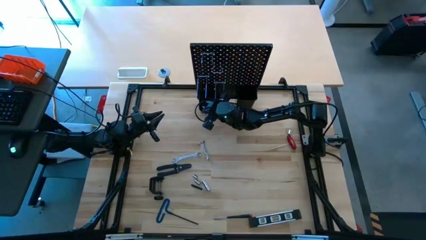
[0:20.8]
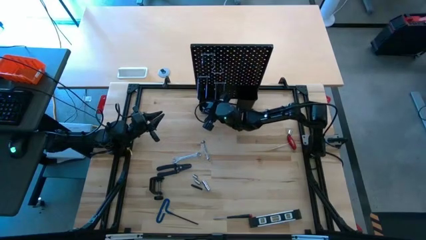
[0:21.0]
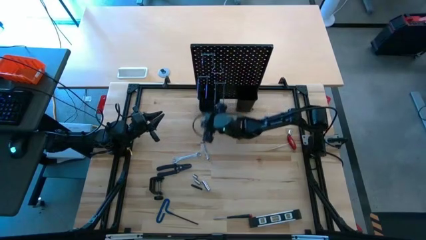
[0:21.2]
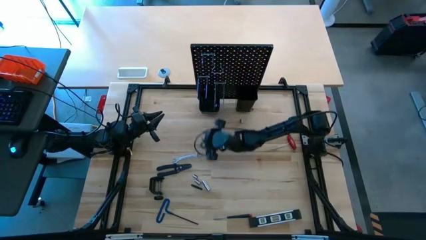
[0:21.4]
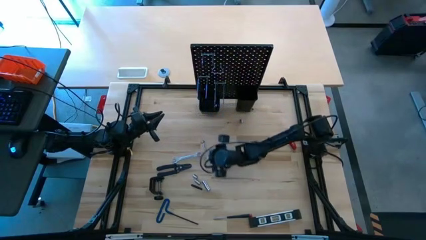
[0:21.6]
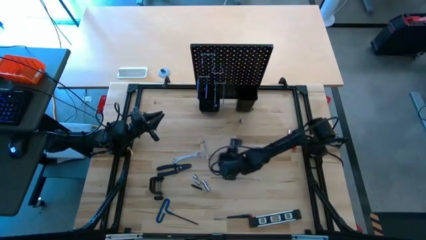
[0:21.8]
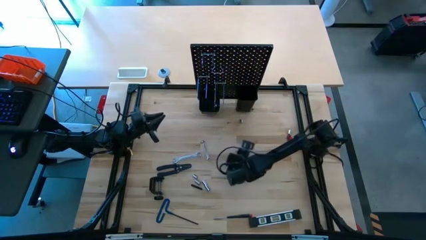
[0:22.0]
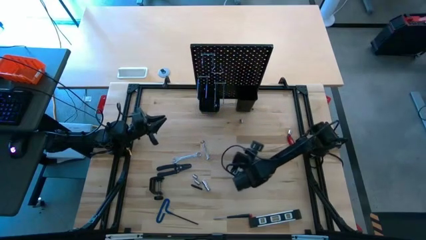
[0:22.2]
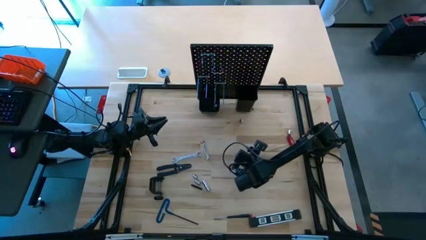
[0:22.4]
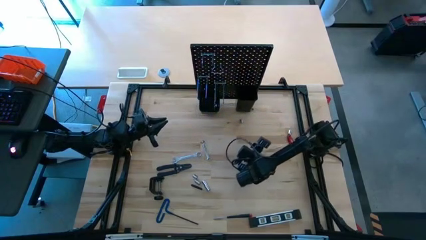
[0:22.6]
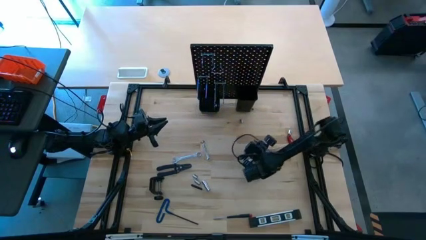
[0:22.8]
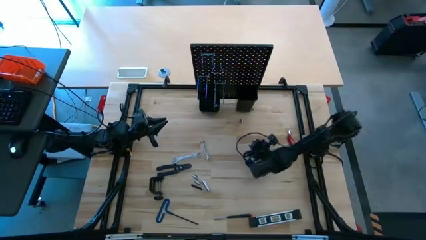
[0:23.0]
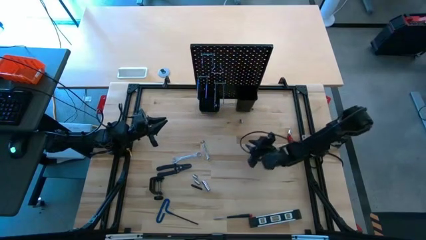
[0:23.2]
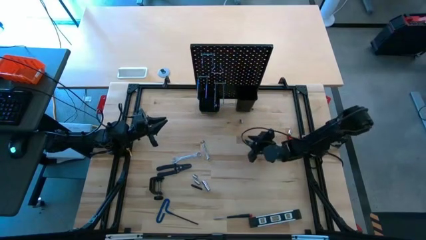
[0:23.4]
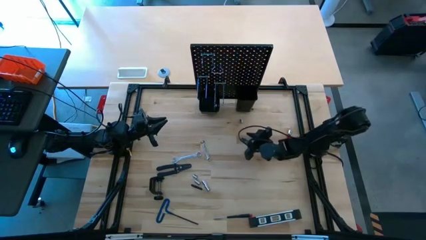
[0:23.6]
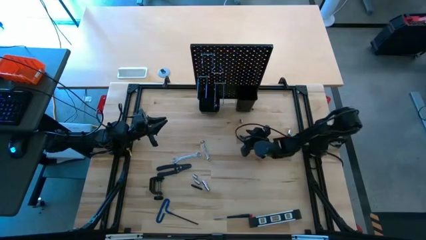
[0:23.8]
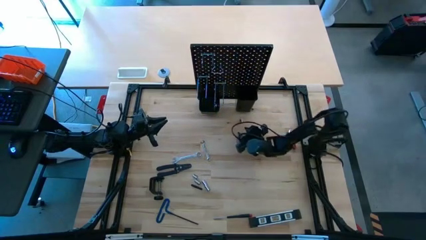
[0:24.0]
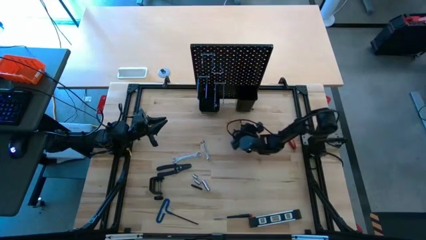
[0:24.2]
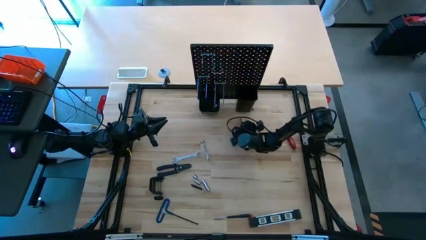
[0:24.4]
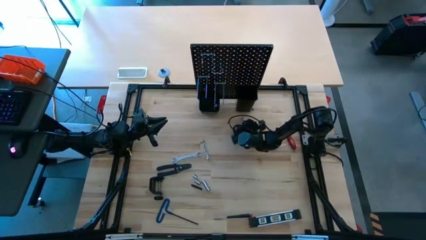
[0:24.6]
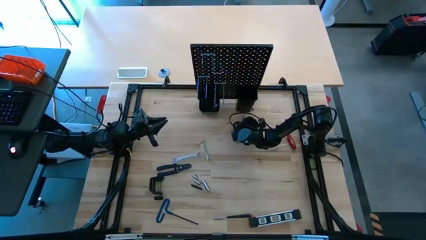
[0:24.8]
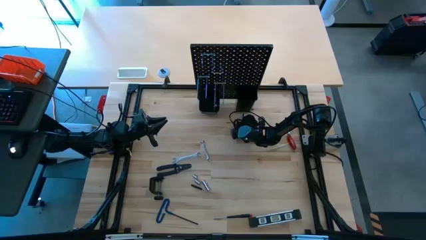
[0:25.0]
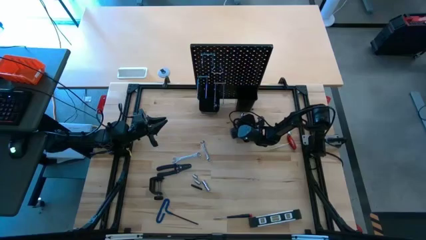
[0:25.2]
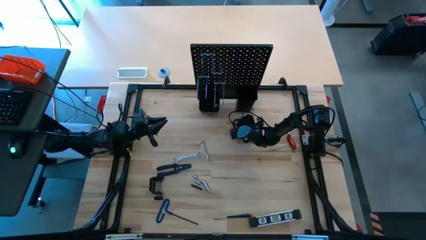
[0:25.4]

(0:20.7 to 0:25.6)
Task: Hang tools onto peg board
Put the socket into the left bin on the pegboard

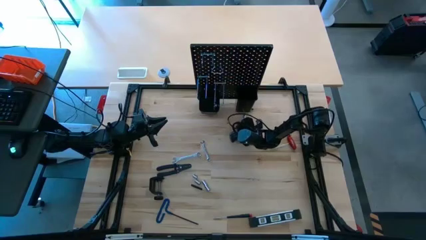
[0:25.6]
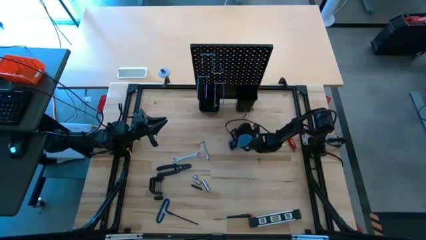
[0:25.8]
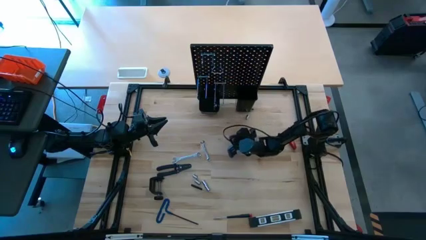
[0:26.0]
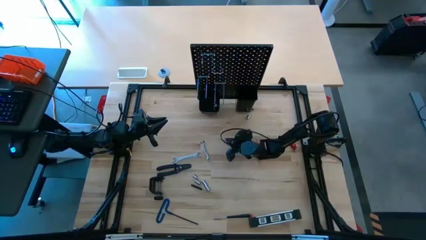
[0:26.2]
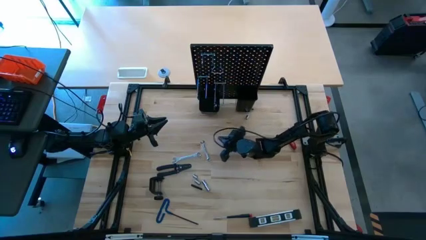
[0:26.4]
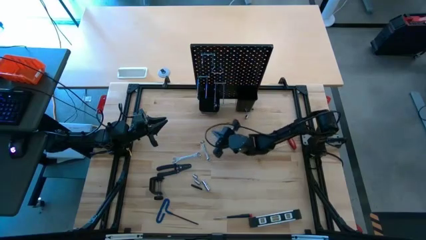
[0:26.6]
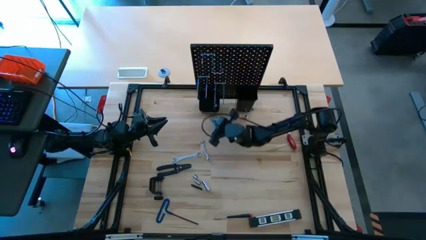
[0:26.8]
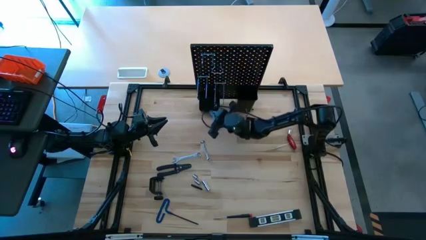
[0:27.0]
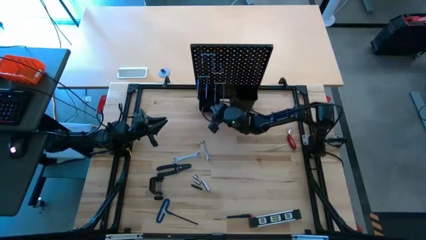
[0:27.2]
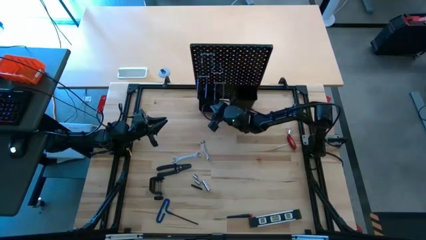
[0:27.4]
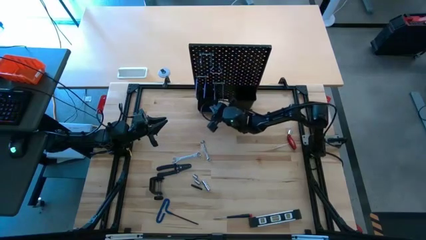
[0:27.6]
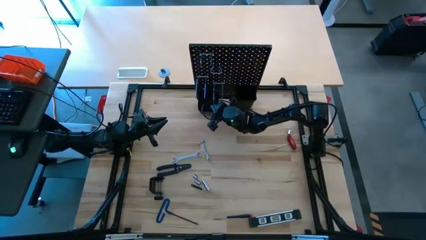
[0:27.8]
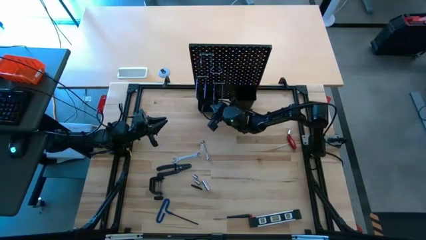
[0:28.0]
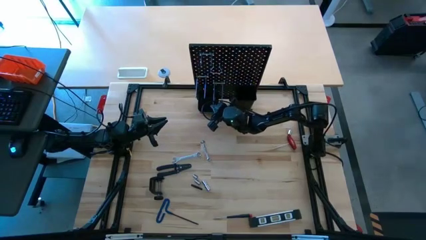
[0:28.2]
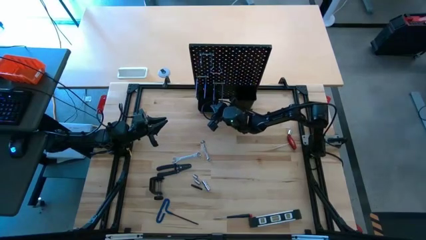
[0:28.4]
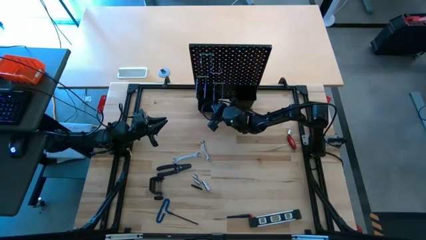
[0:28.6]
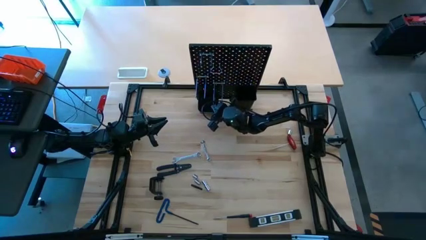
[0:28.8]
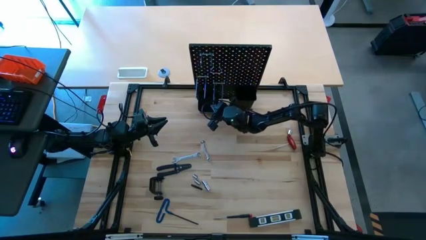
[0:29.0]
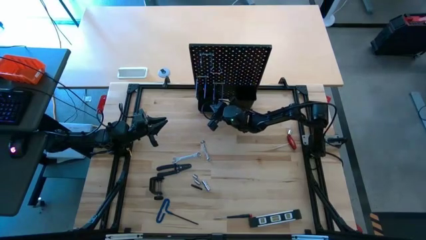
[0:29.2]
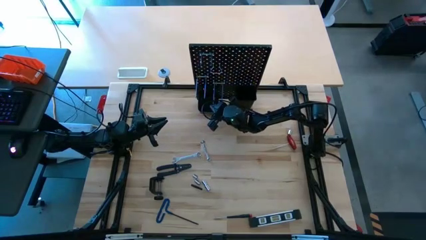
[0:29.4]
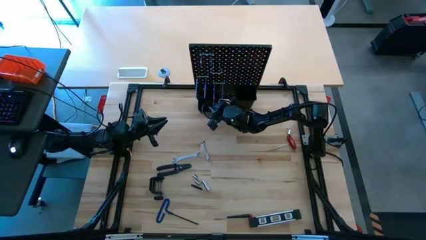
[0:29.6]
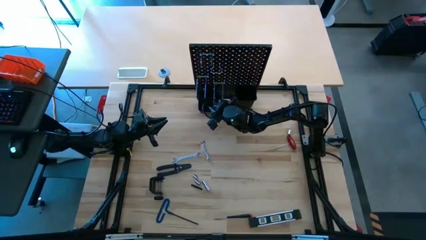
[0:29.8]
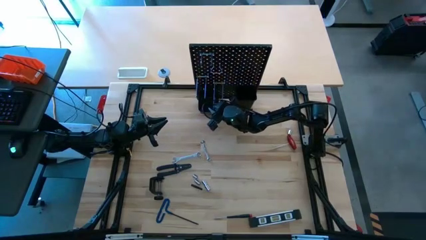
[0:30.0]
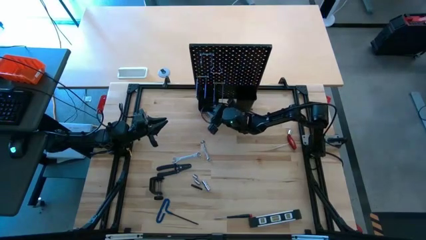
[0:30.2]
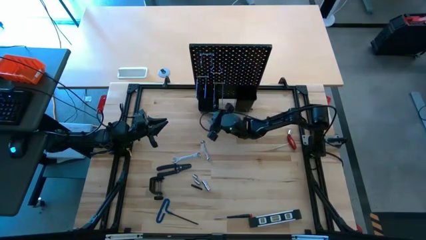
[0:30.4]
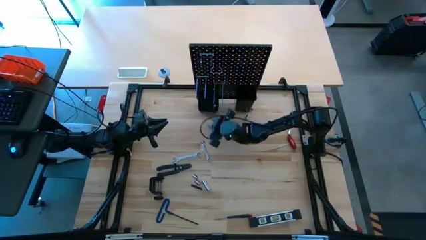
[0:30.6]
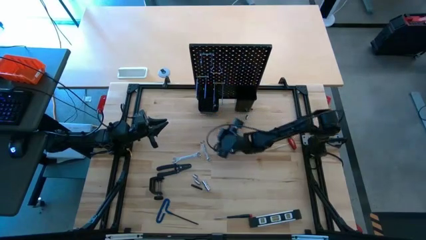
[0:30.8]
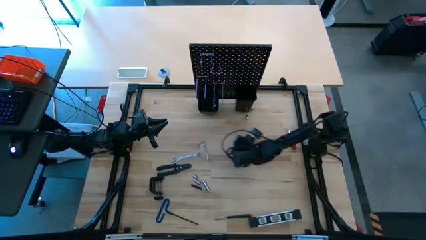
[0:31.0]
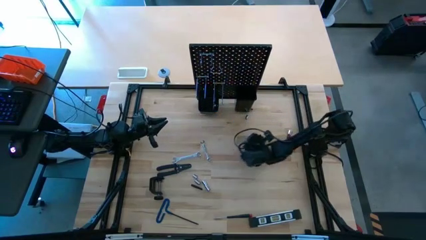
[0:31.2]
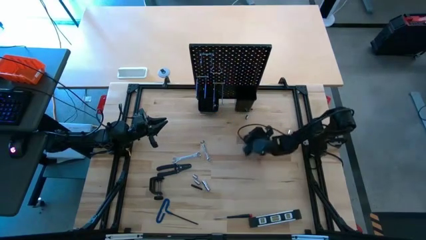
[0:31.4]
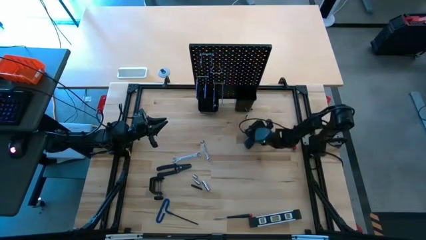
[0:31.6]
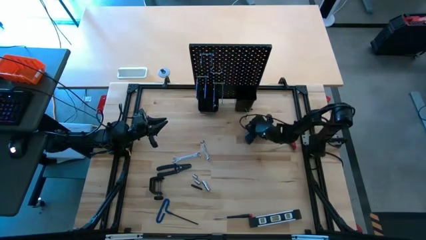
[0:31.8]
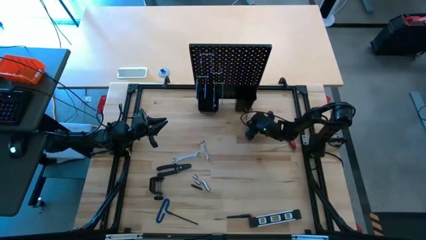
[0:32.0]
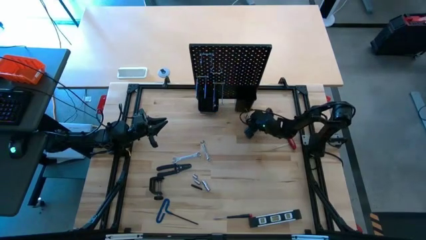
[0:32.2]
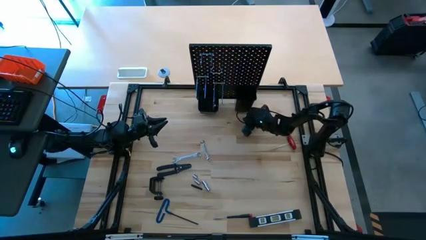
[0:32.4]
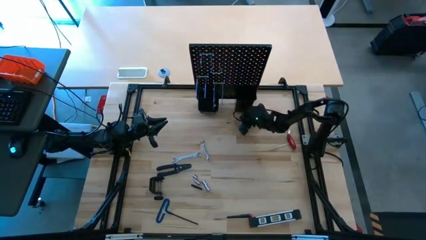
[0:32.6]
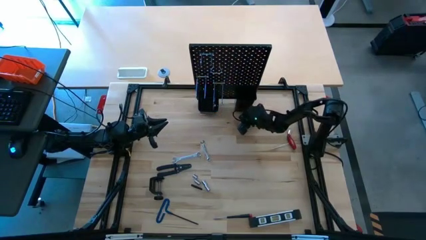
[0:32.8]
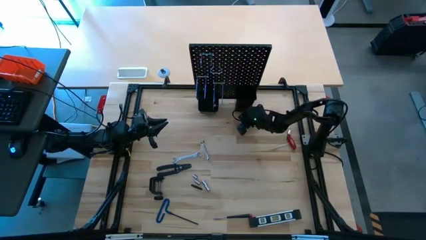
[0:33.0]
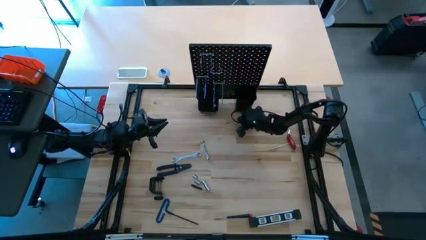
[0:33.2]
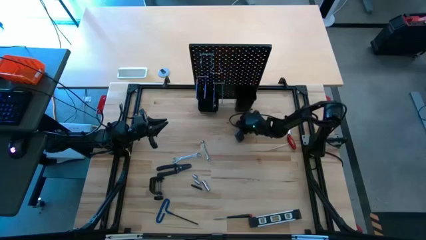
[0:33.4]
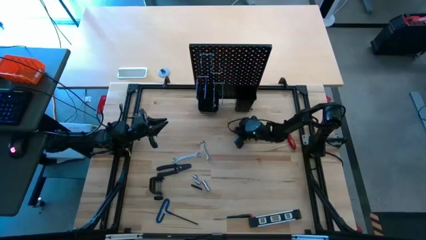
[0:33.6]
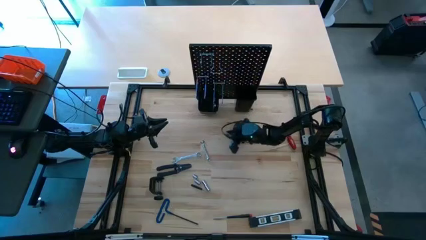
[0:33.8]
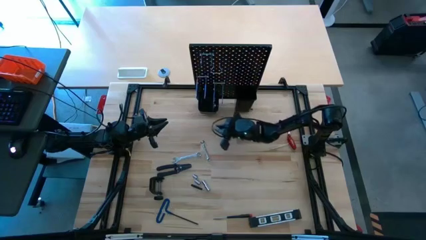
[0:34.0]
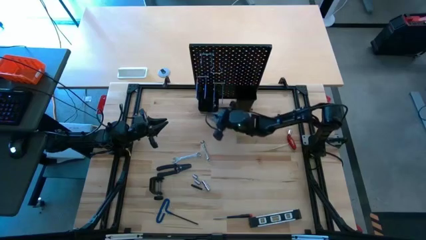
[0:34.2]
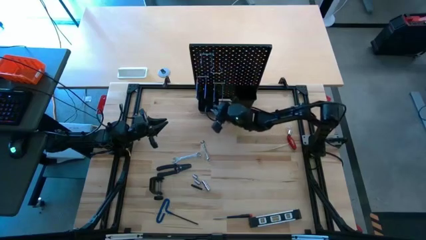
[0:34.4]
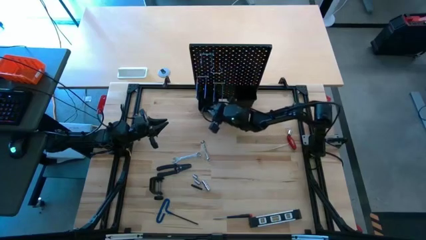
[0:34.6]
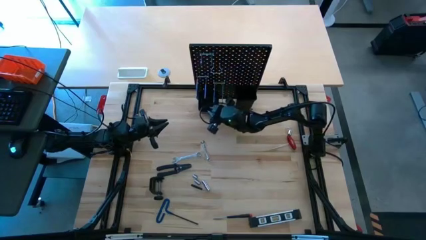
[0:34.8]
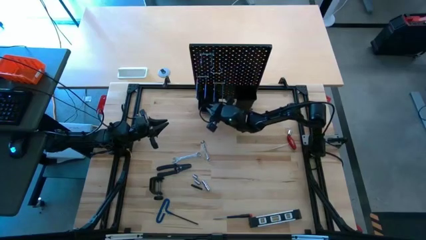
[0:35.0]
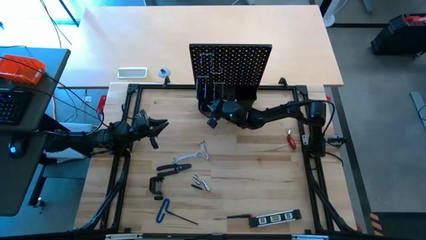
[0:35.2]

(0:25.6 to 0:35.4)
Put the socket into the left bin on the pegboard

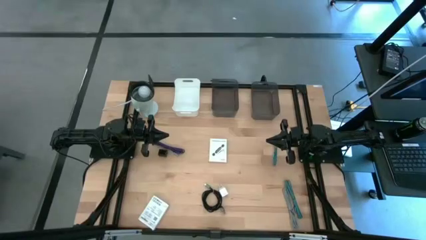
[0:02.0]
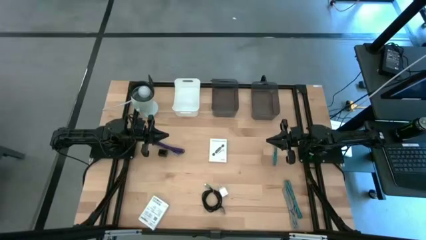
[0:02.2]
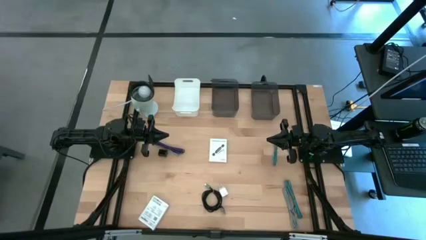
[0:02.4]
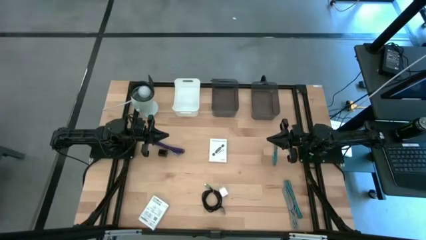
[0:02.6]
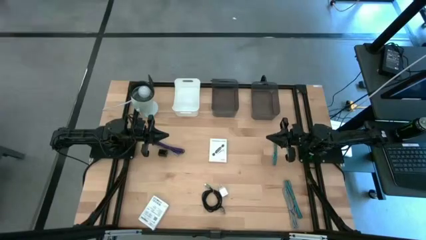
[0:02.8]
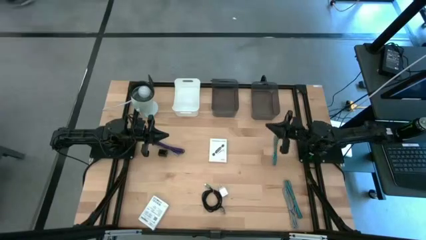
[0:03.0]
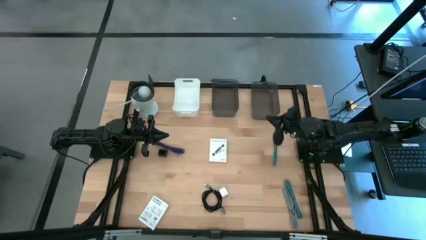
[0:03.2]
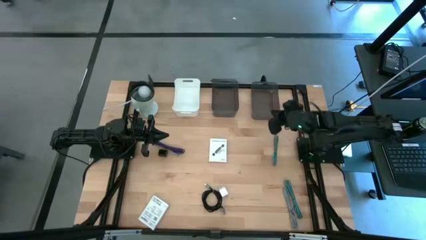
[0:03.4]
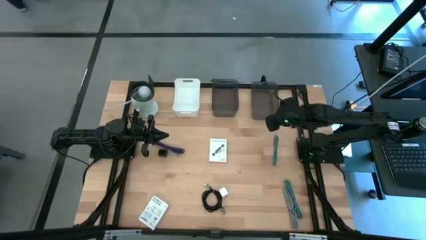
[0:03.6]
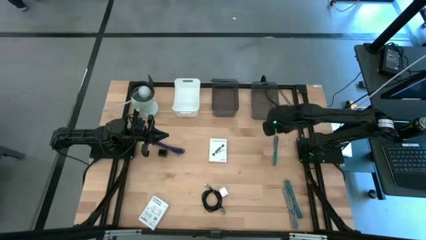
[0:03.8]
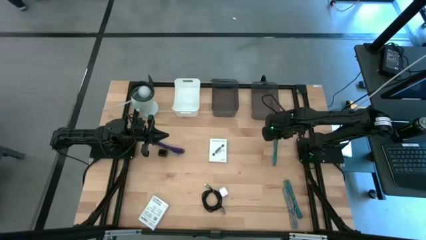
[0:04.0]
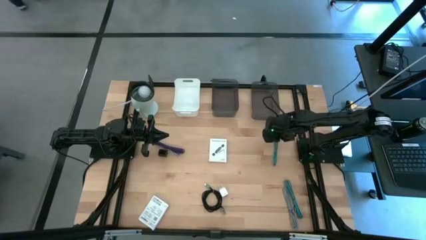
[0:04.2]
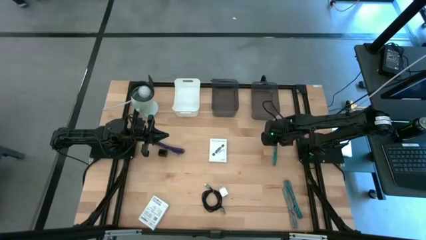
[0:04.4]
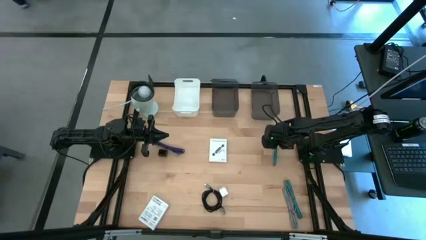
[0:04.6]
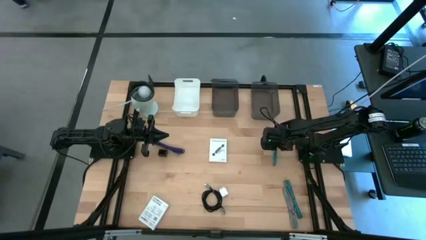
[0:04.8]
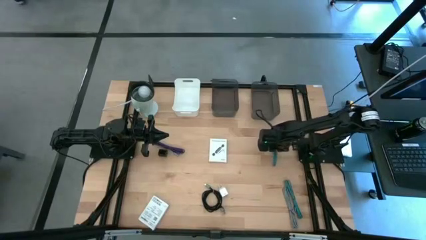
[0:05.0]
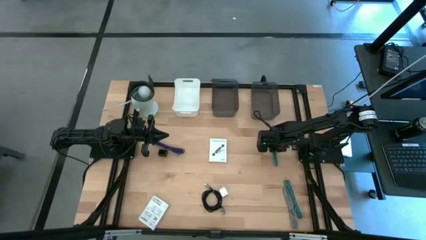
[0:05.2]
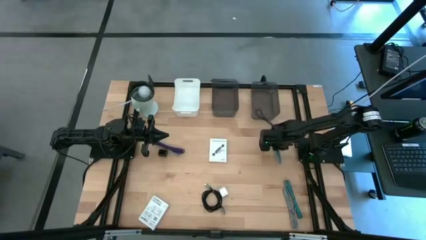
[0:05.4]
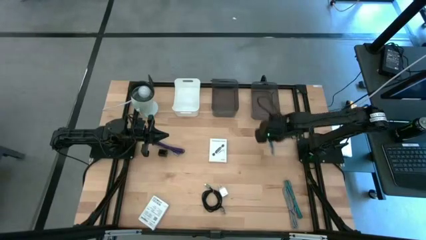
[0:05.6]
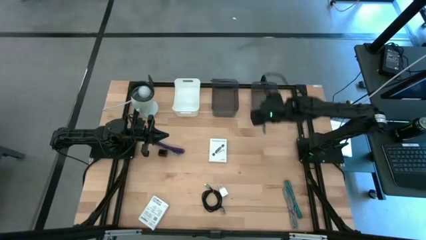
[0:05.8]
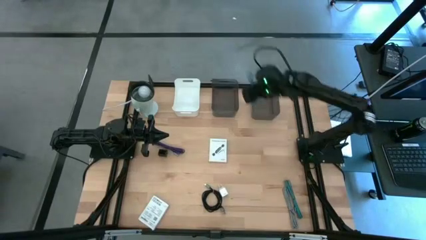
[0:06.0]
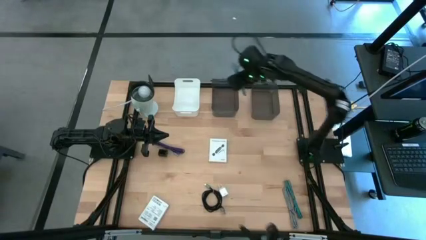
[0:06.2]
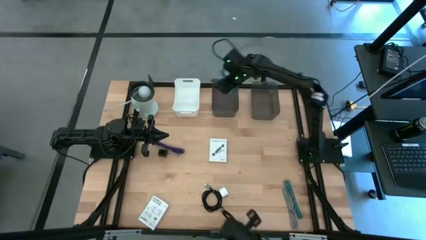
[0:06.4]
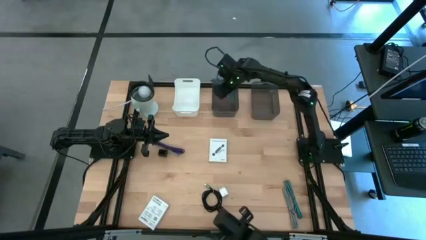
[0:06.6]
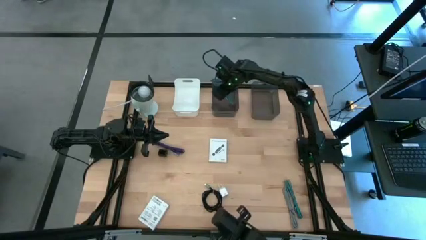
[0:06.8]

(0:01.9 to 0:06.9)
Task: Pick and place items into bin
Put the top blue charger cable into the left black bin
